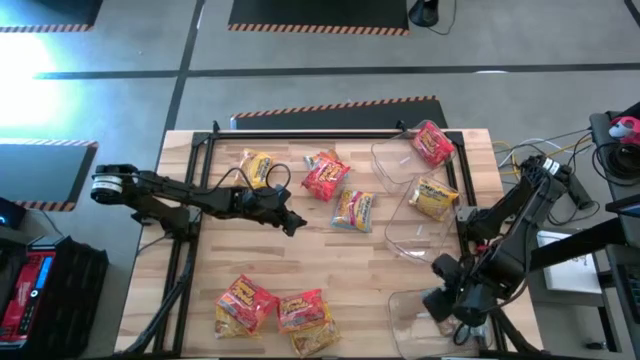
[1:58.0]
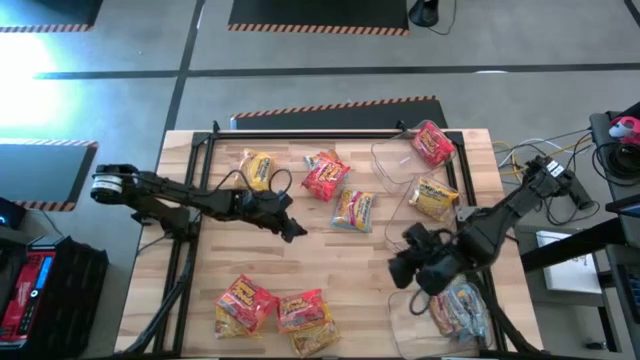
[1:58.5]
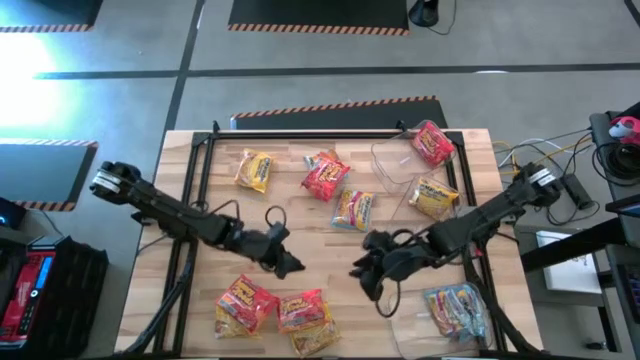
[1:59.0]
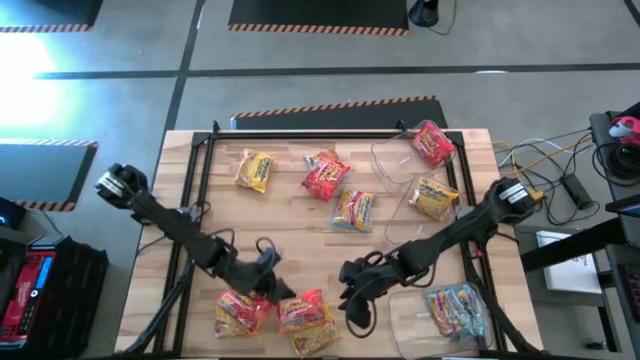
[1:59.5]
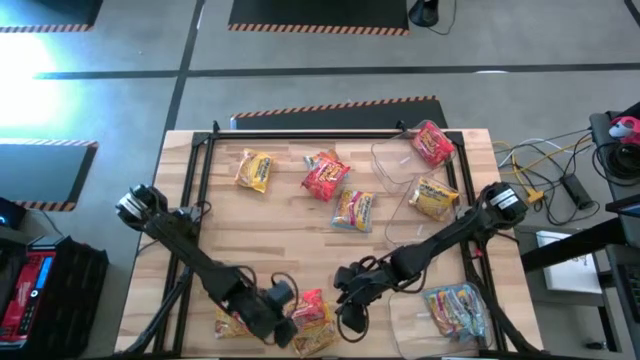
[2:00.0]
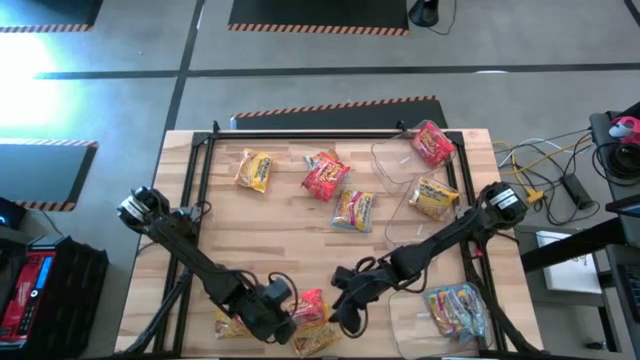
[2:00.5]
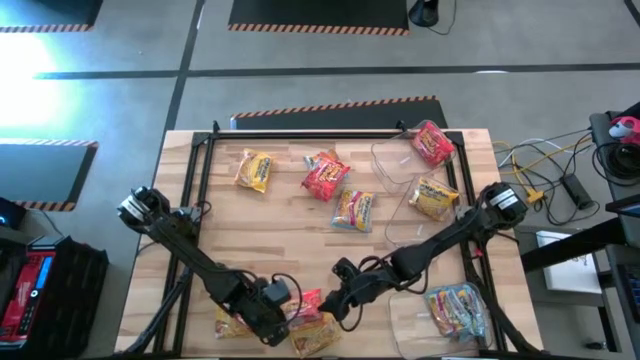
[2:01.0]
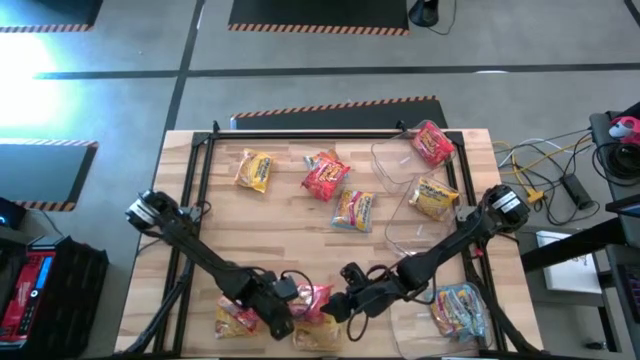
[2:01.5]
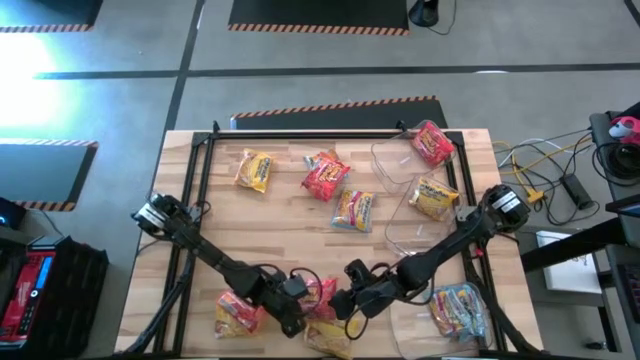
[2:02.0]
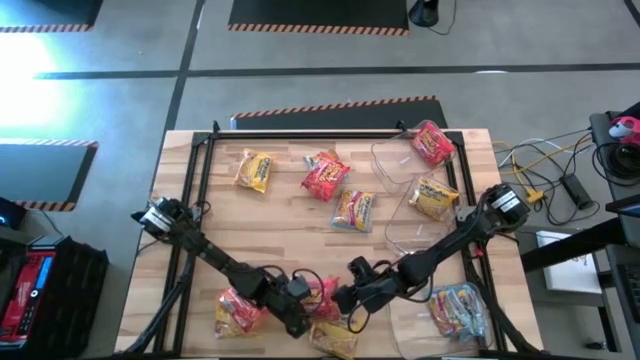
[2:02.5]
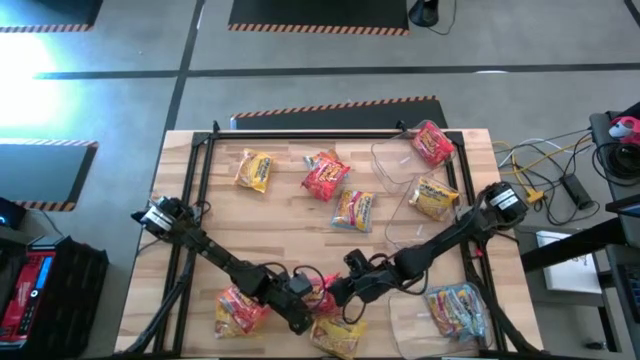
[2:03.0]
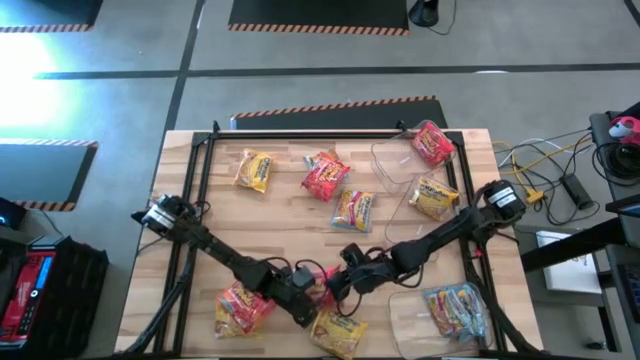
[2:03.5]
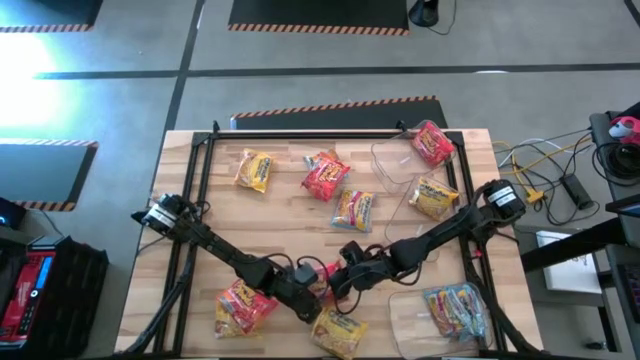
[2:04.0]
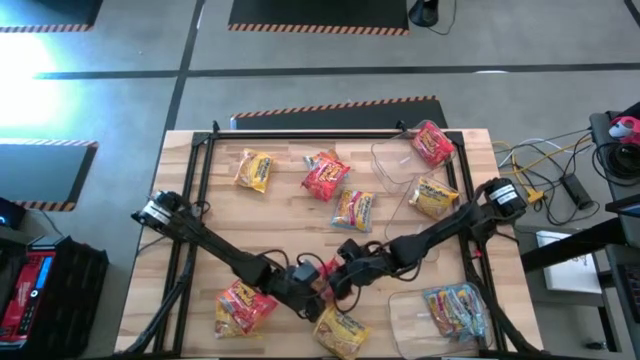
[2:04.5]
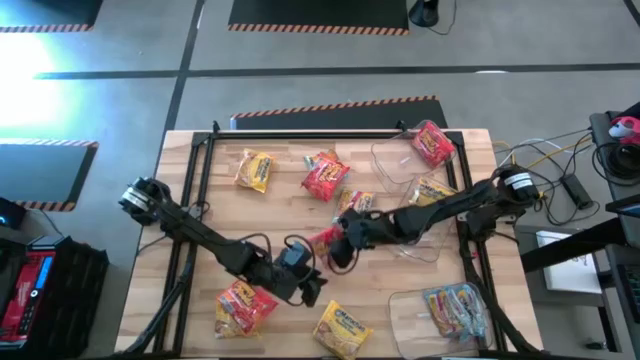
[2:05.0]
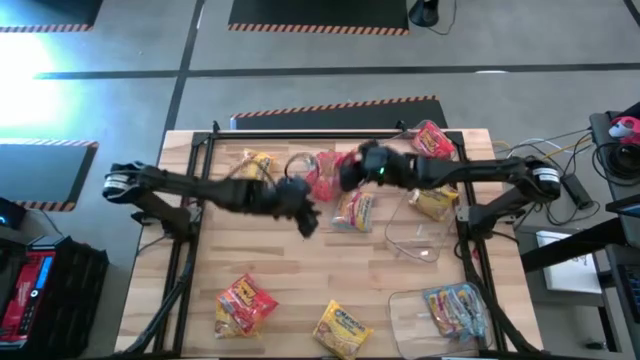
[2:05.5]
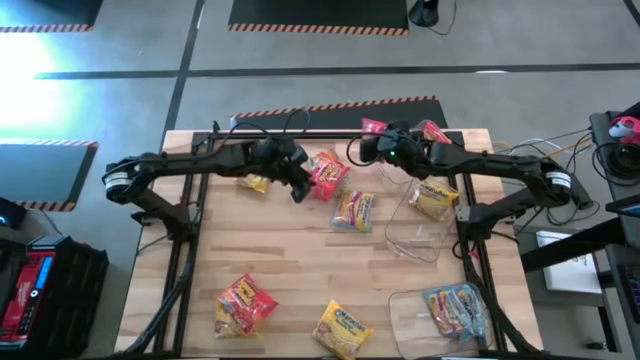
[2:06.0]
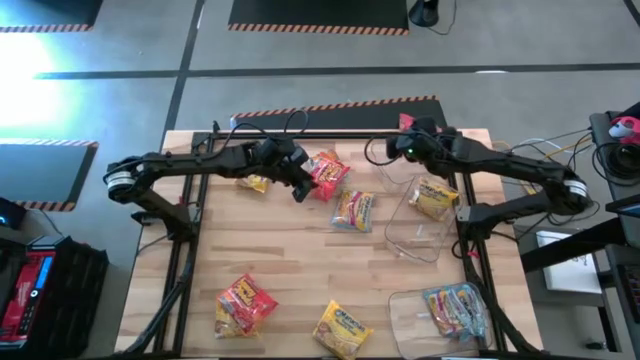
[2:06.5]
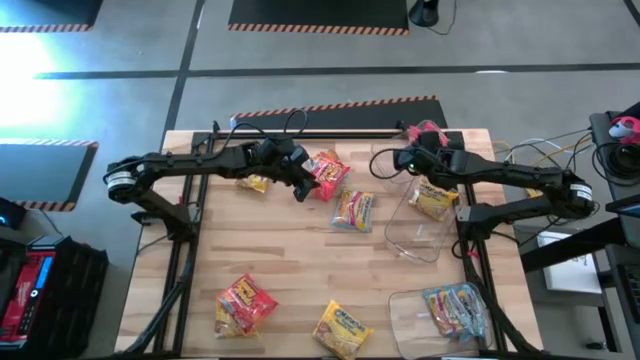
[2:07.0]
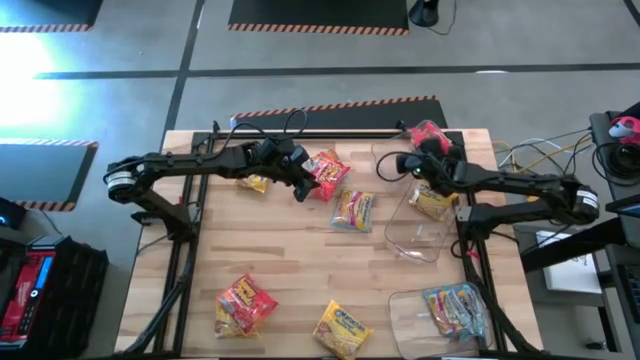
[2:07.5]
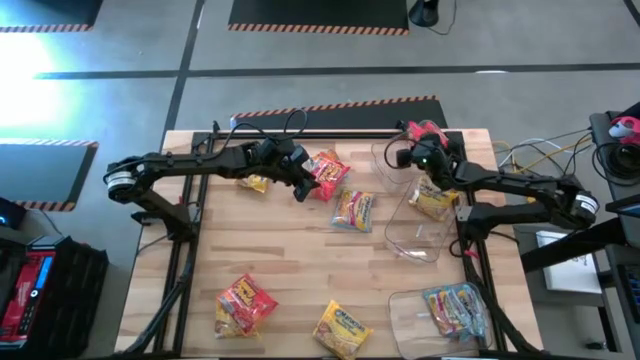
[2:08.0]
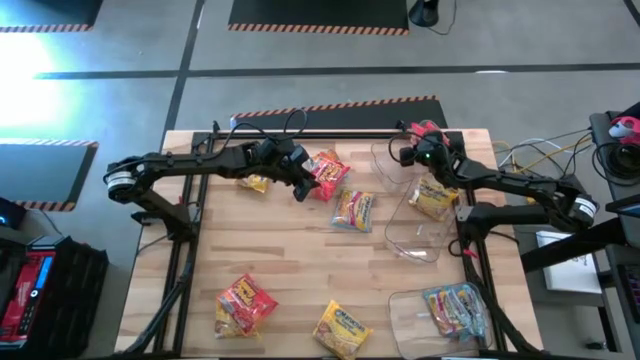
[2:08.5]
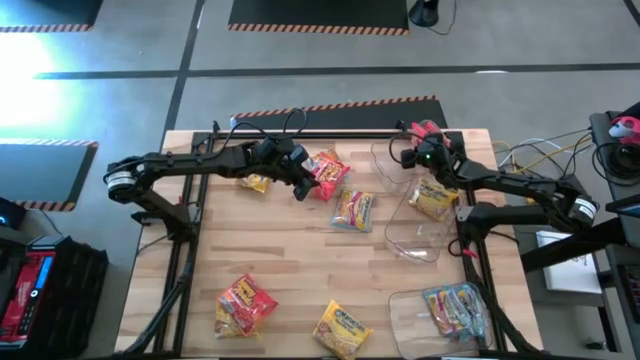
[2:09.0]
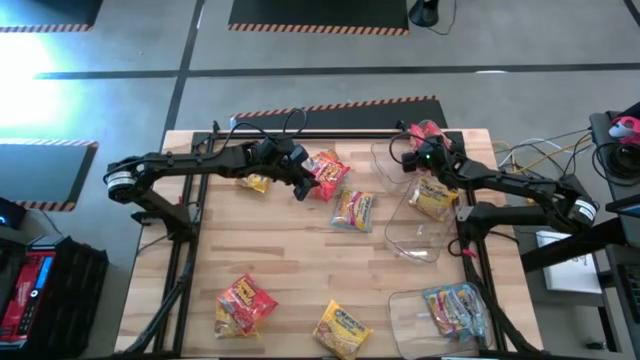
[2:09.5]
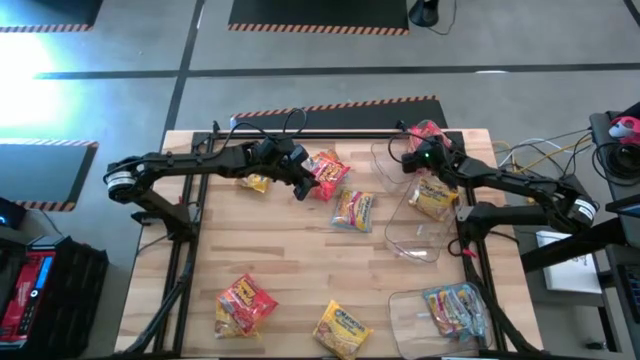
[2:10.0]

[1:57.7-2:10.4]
Task: Sort Maruchan noodles
Put the orange noodle pack into the top transparent bin

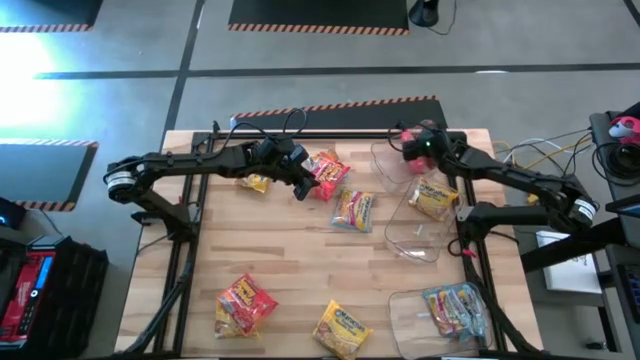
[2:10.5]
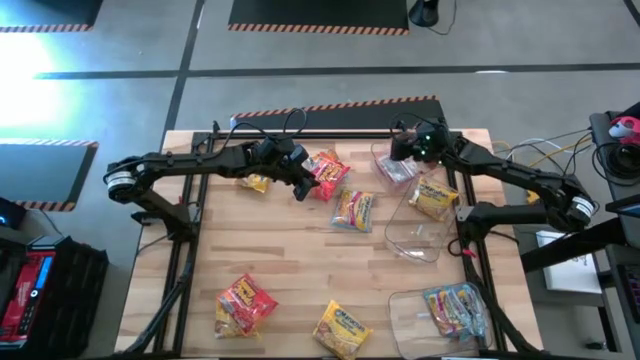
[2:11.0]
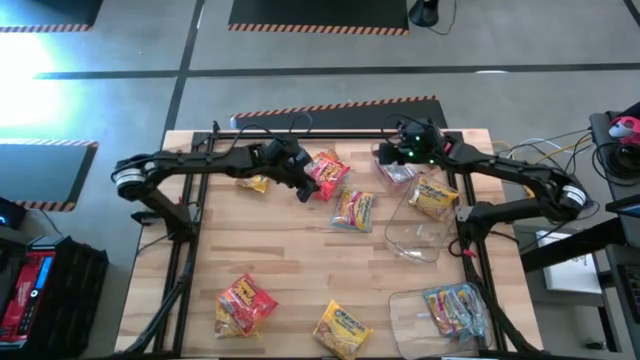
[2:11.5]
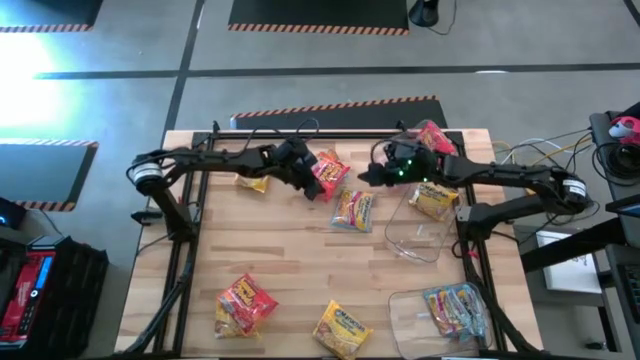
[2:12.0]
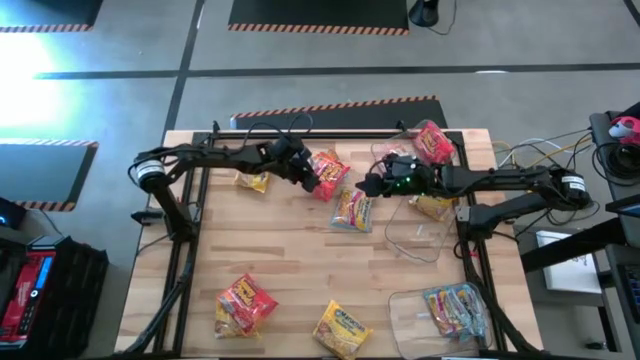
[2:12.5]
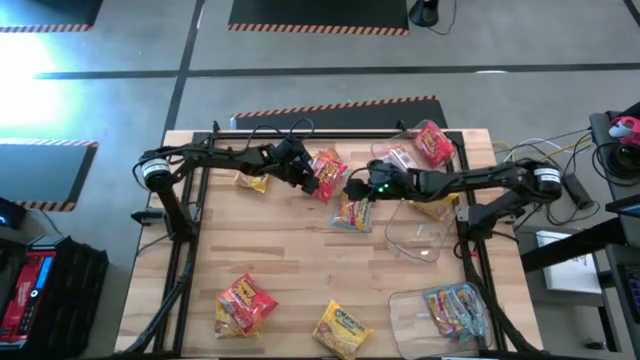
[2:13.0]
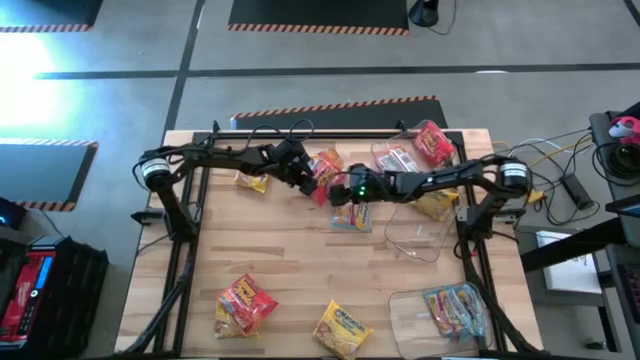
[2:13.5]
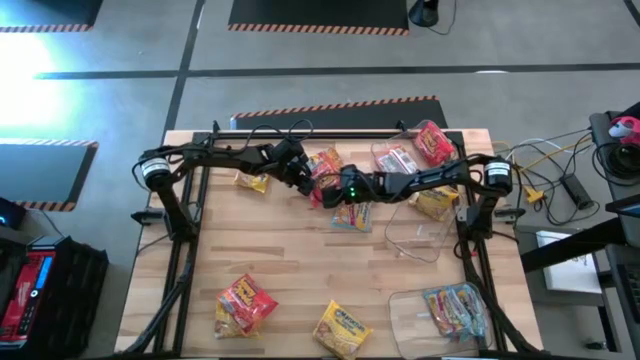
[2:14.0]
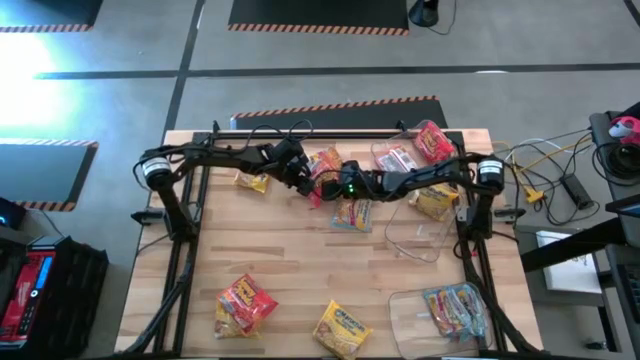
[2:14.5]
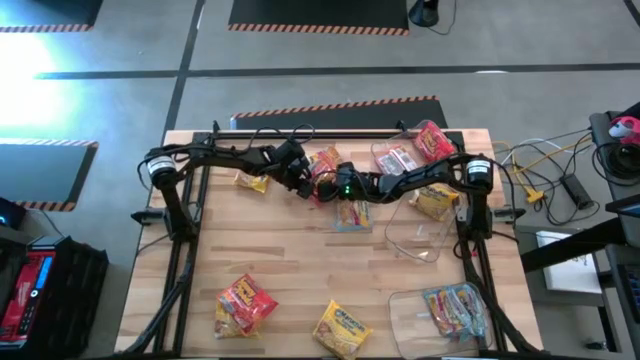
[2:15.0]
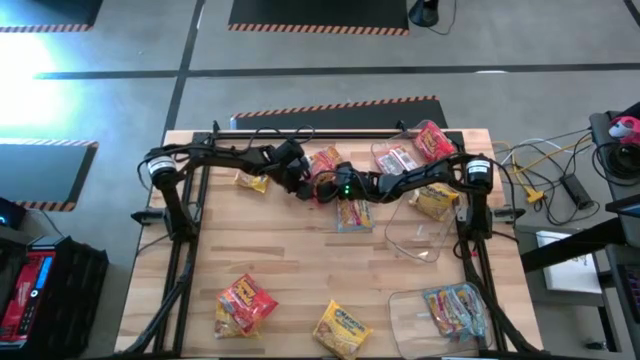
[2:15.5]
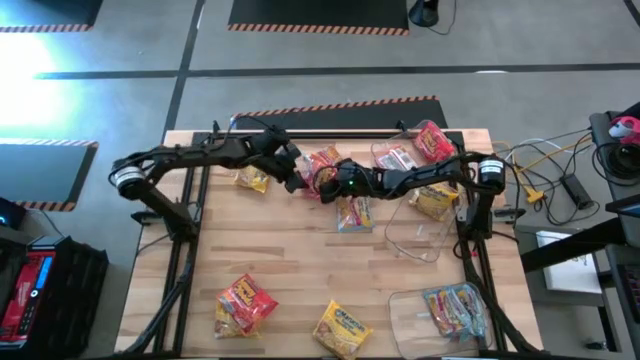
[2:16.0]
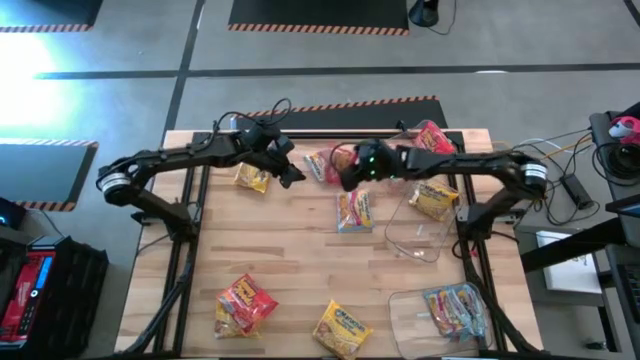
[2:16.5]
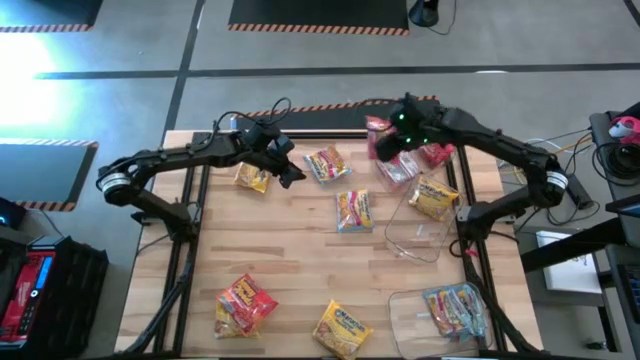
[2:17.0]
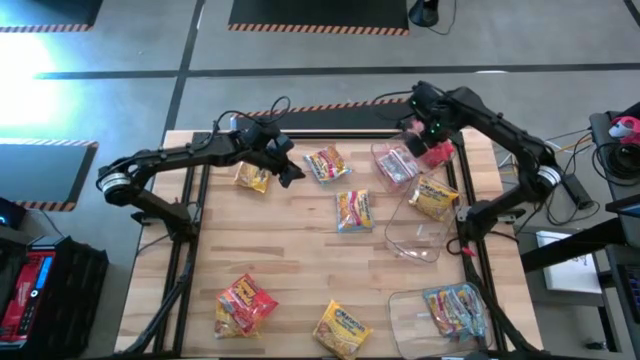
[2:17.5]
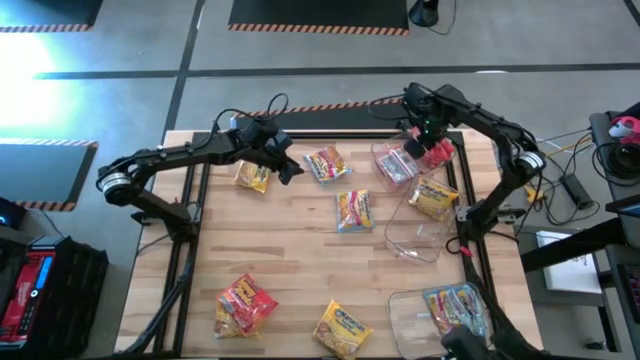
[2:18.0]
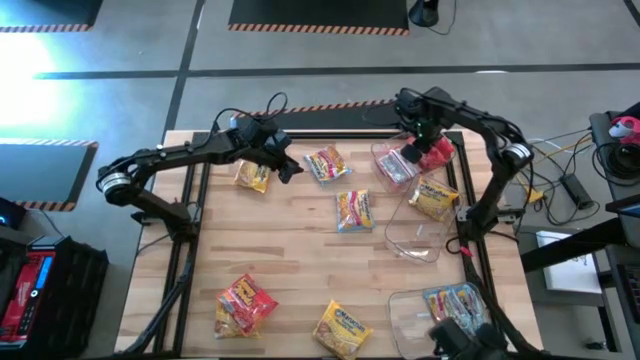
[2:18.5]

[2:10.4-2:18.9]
Put the orange noodle pack into the top transparent bin
